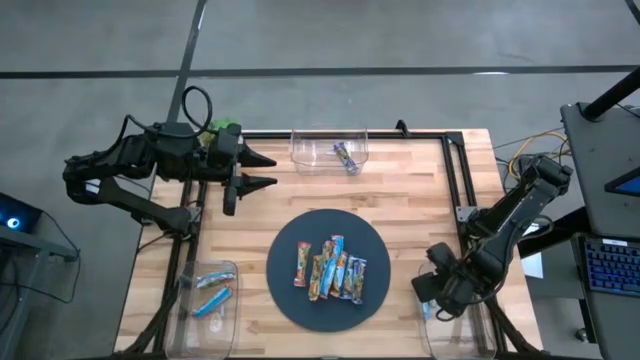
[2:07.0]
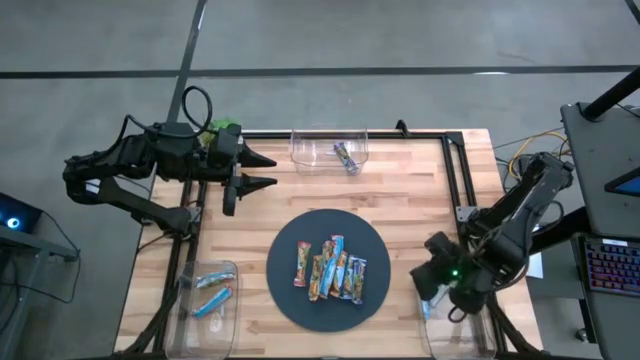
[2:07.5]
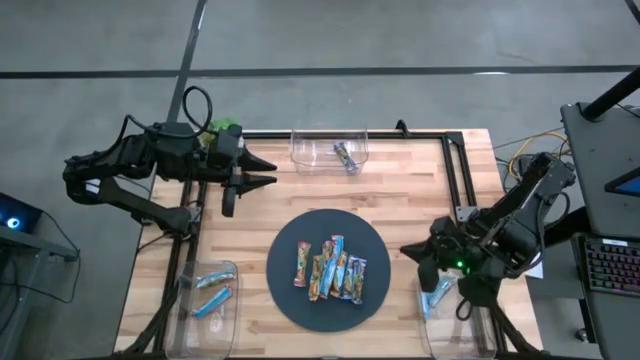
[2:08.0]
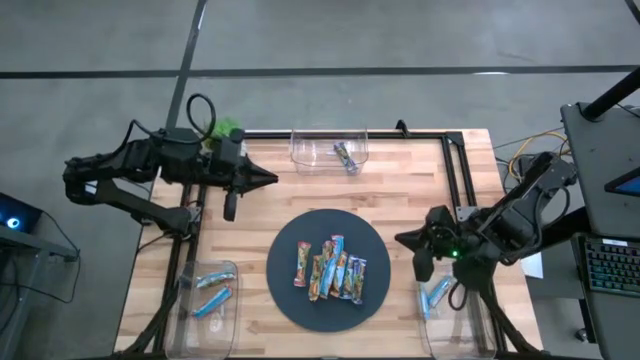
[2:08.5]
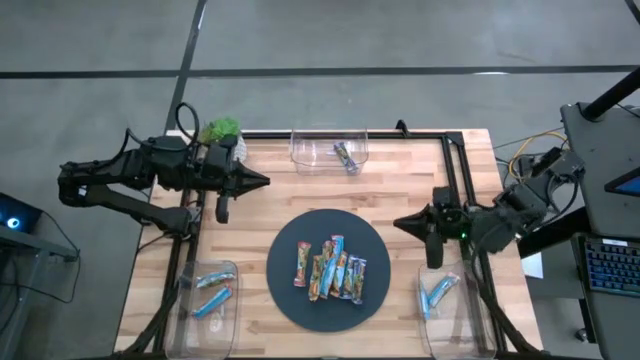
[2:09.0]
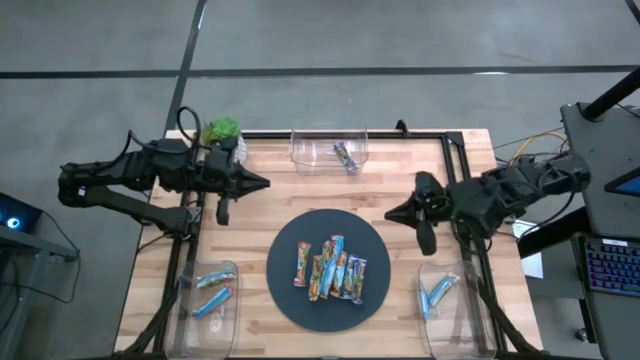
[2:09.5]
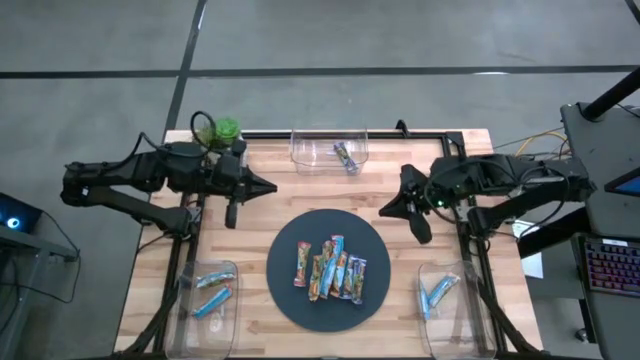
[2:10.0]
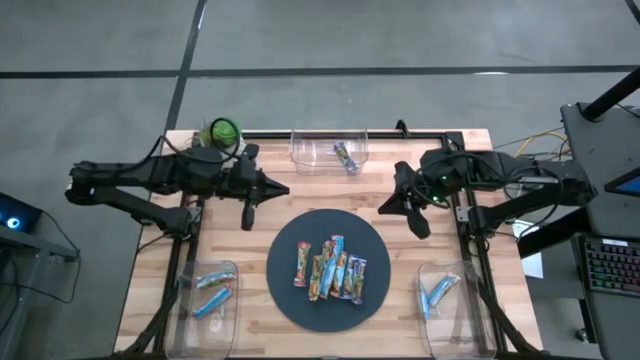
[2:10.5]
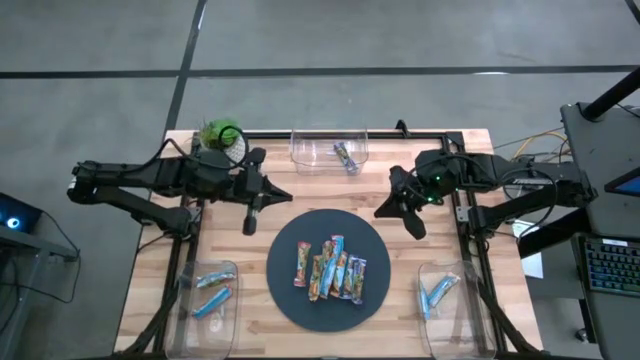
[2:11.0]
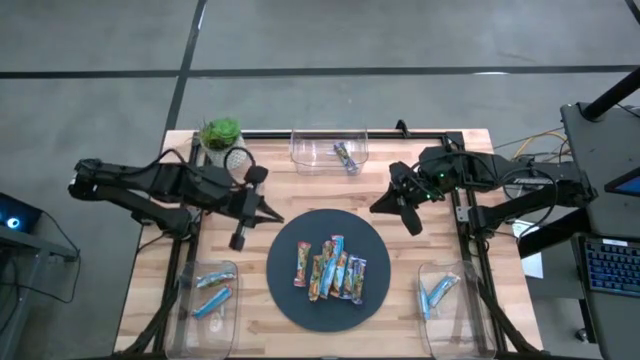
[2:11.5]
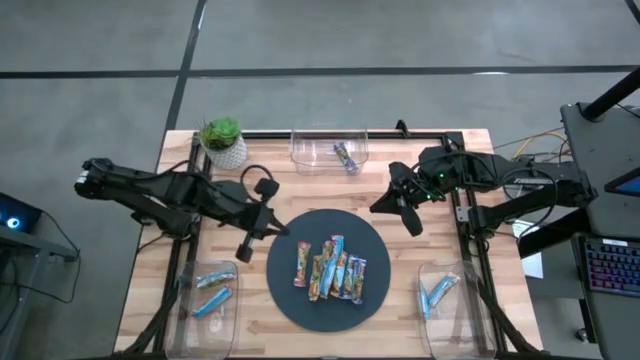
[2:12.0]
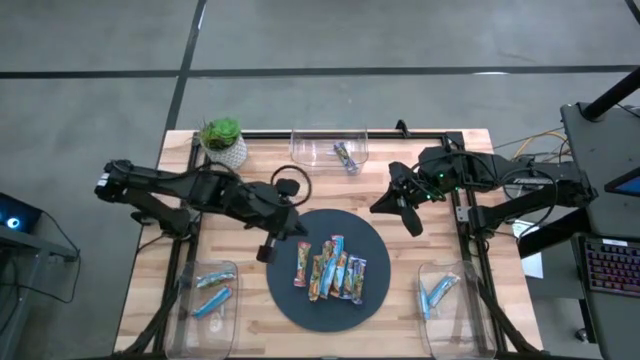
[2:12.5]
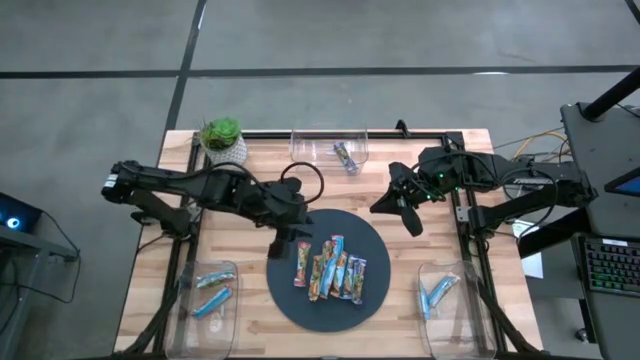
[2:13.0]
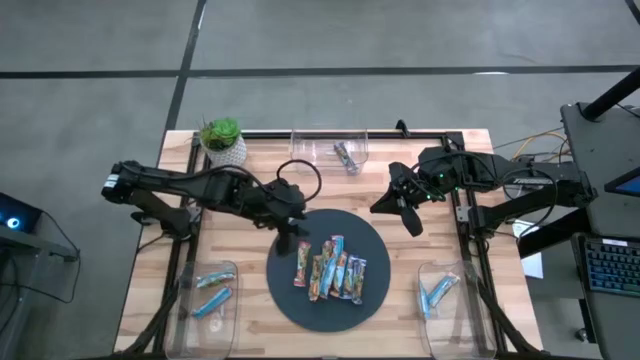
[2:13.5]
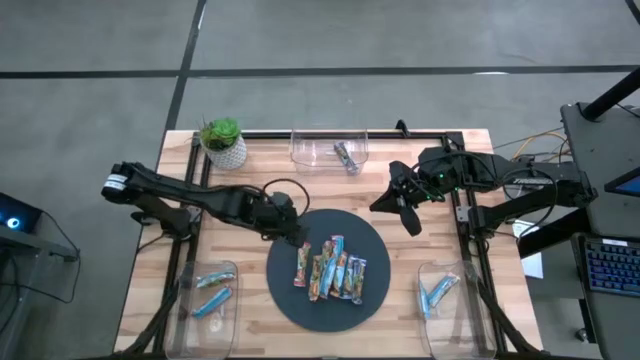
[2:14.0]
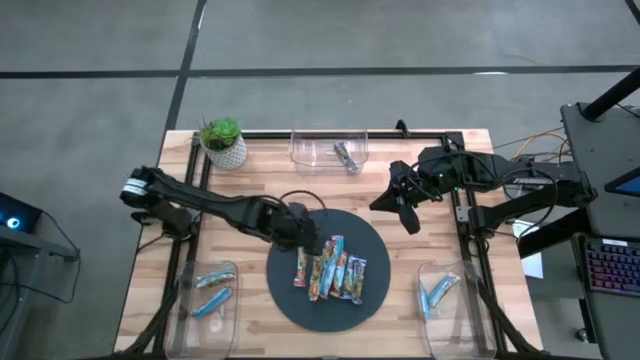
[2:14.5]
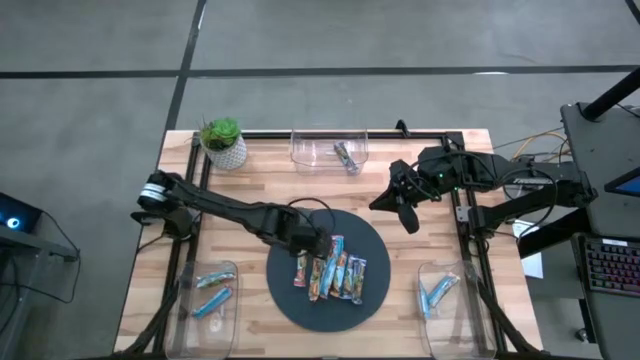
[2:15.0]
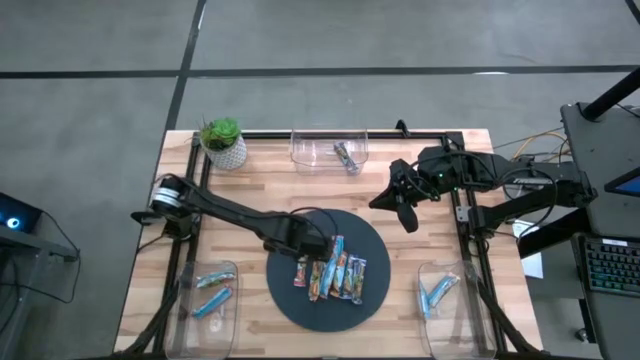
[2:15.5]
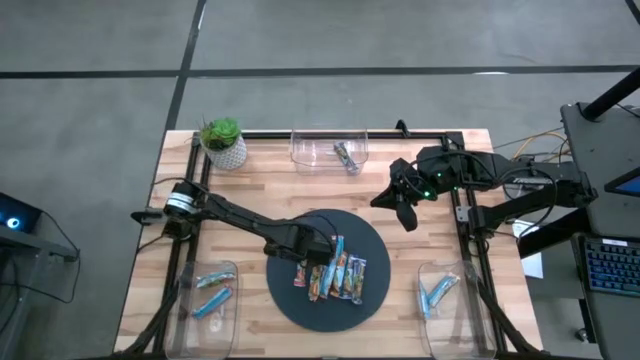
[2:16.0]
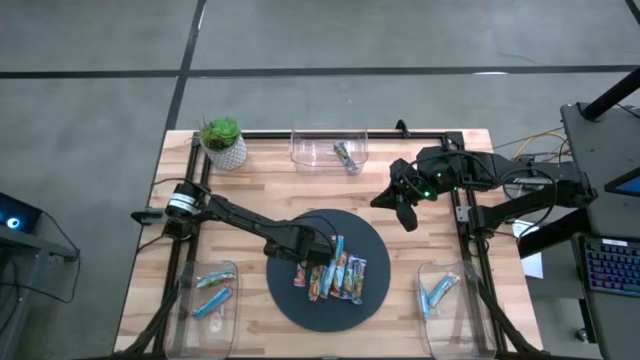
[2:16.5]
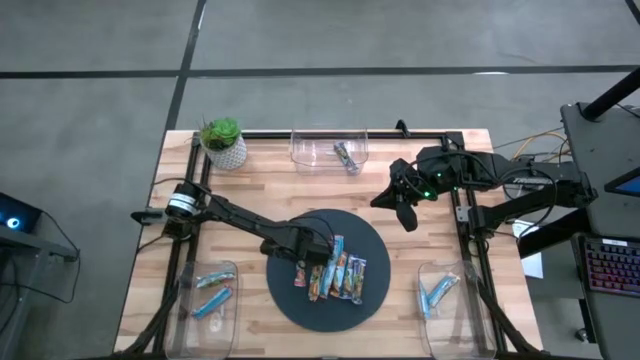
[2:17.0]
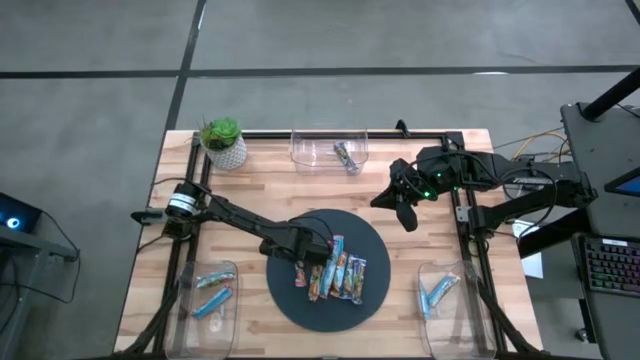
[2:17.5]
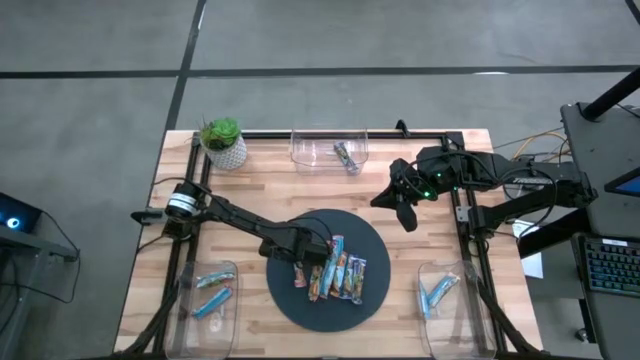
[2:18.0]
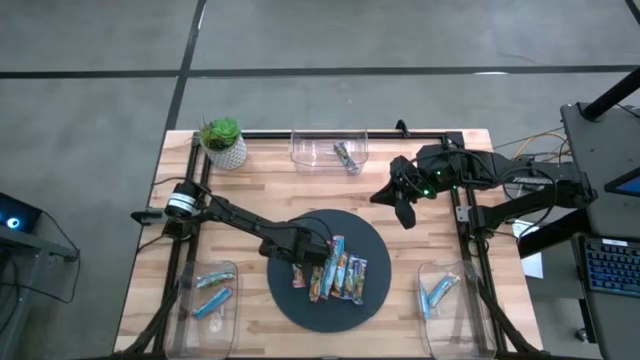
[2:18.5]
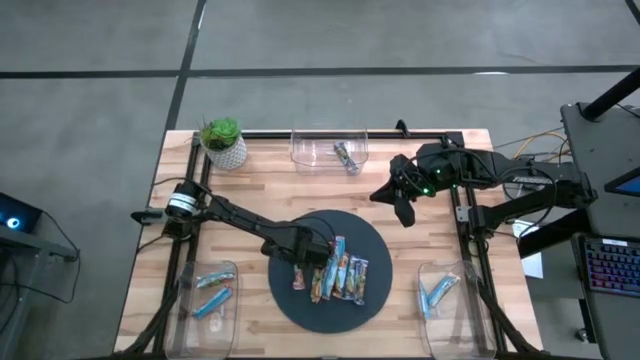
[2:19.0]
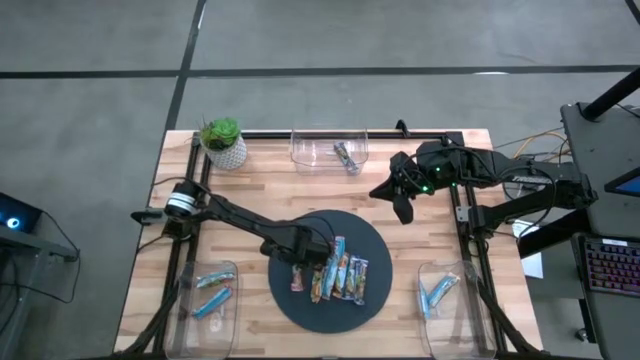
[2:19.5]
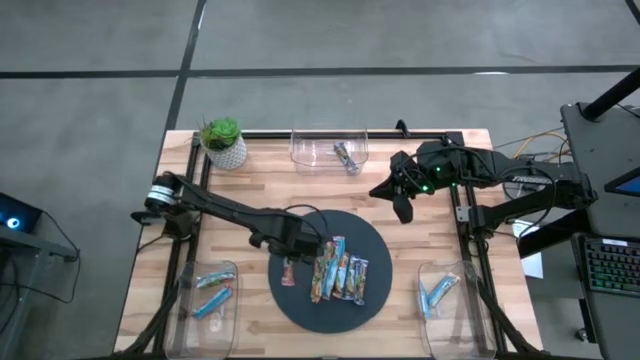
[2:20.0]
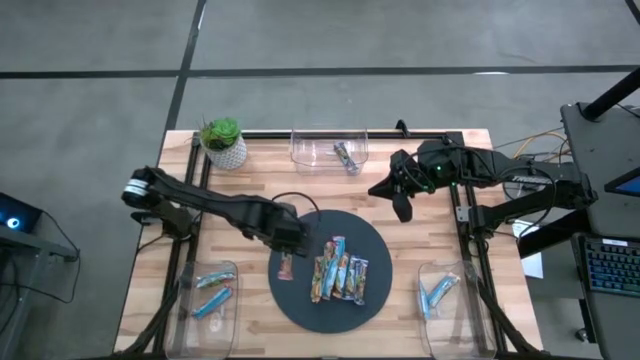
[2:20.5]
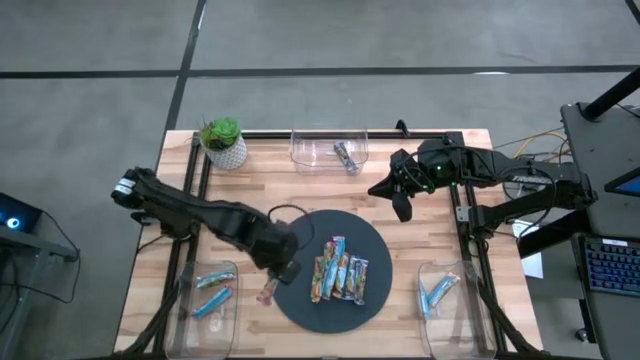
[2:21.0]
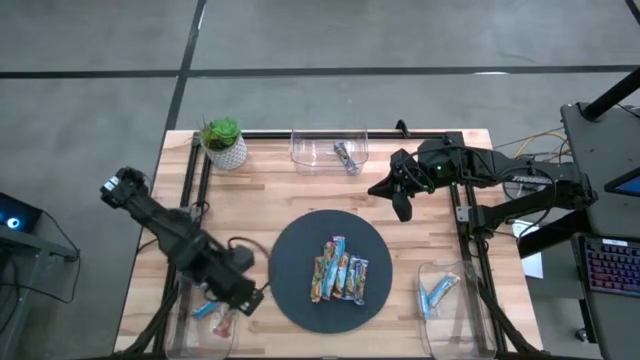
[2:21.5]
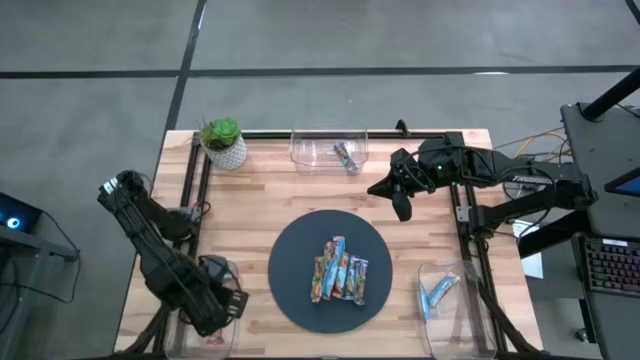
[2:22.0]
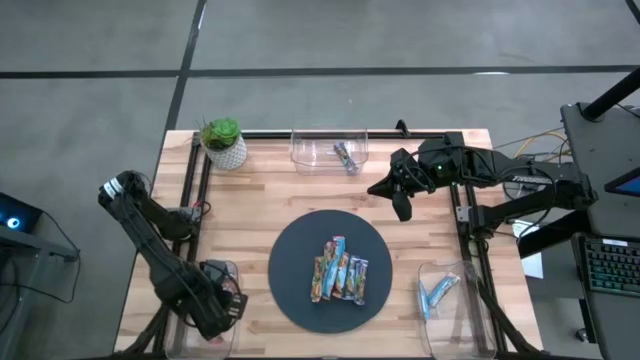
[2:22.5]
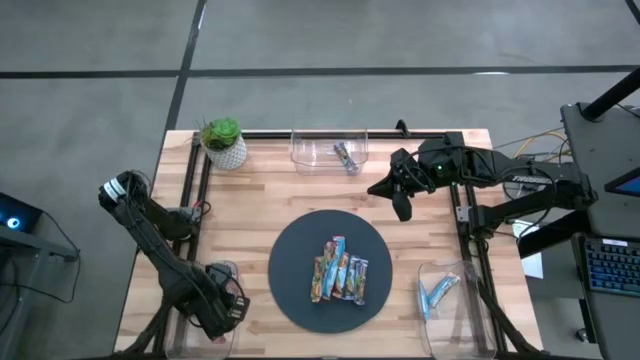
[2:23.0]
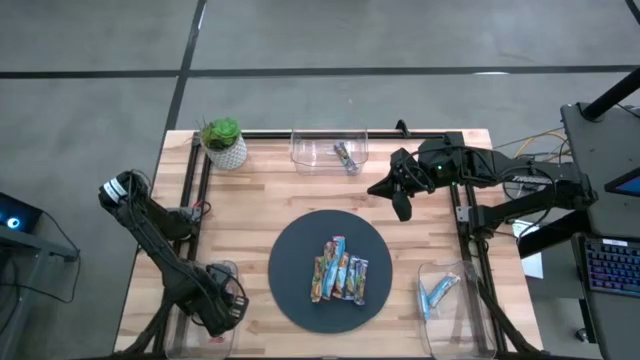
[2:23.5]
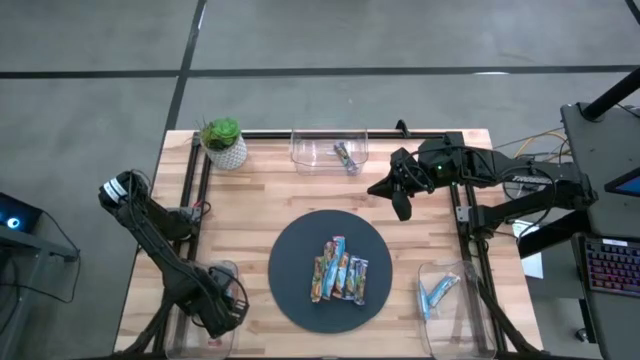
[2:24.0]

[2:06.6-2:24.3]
Task: Pick and place Granola Bars by type
Put the red granola bar into the bottom left transparent bin

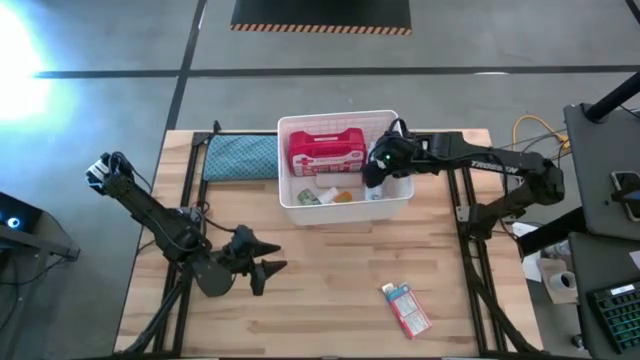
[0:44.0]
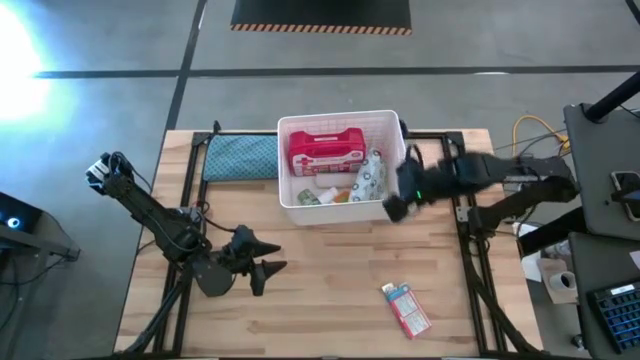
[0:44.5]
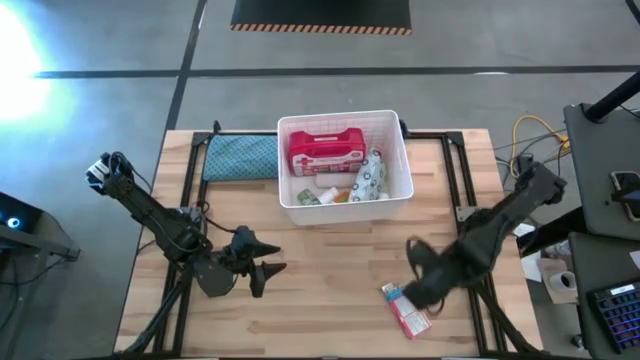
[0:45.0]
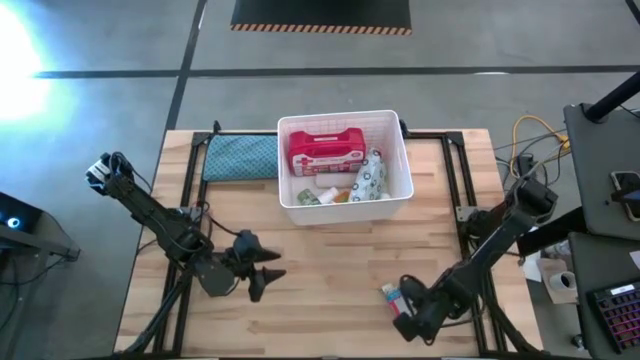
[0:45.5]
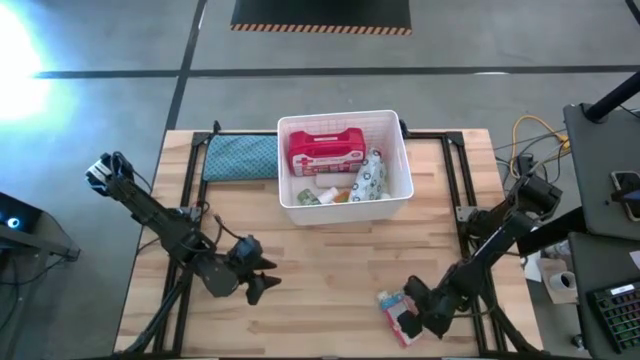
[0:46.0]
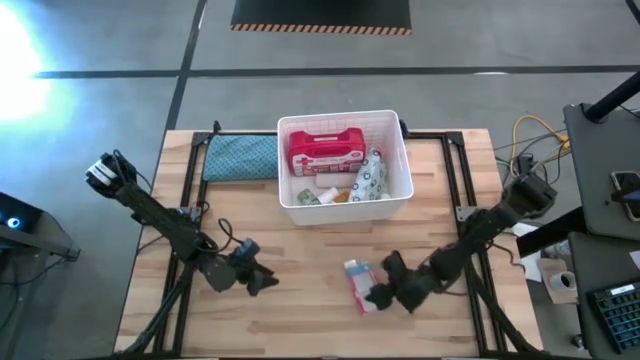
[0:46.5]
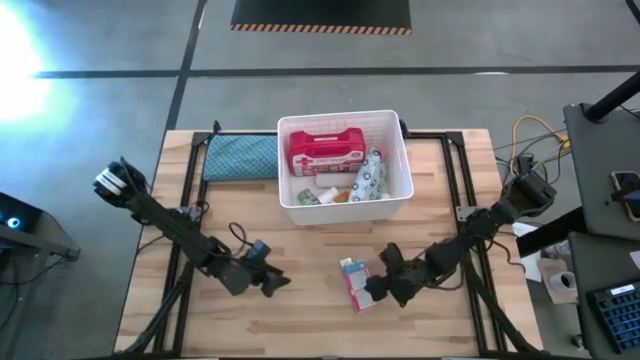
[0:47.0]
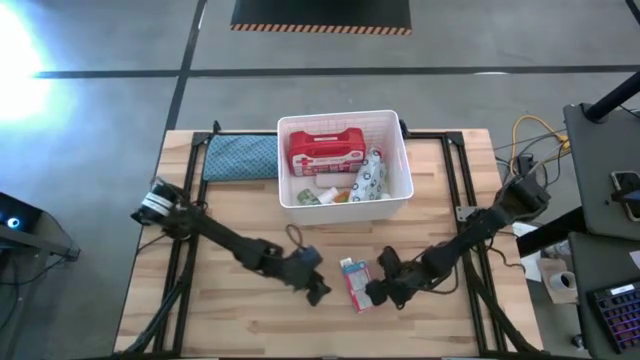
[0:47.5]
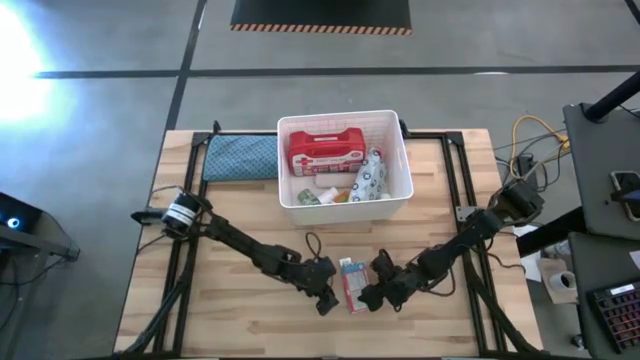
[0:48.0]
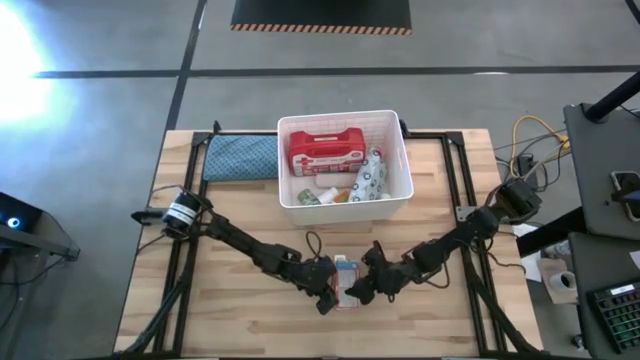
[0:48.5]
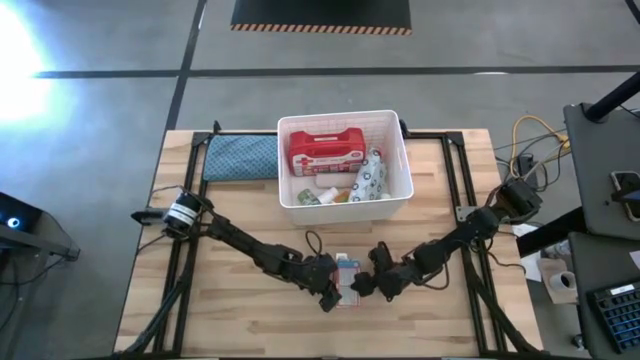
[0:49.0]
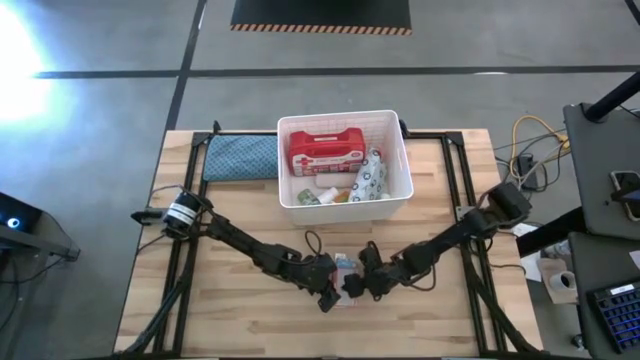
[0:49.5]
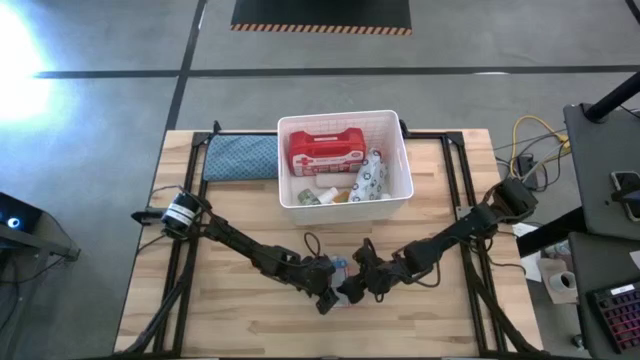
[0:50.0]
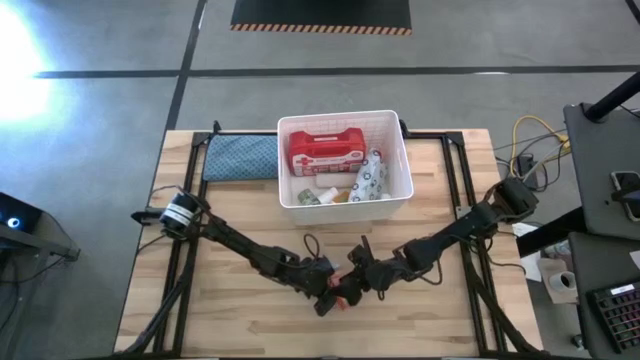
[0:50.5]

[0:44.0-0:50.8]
Task: Pick & place medical supplies in basket/bin
Put the red pill box into the bin
